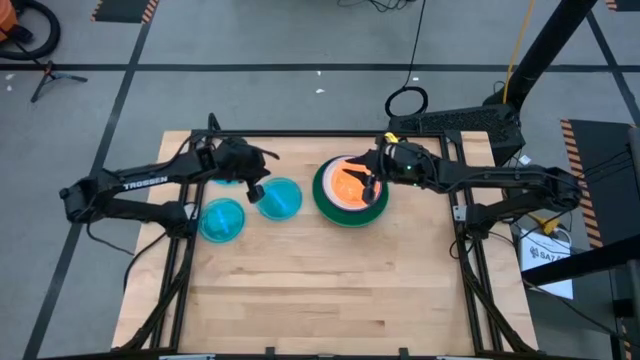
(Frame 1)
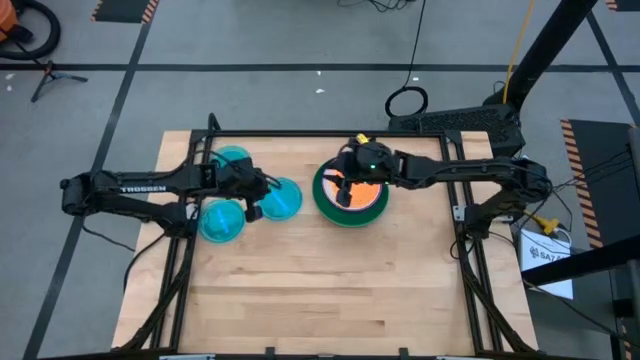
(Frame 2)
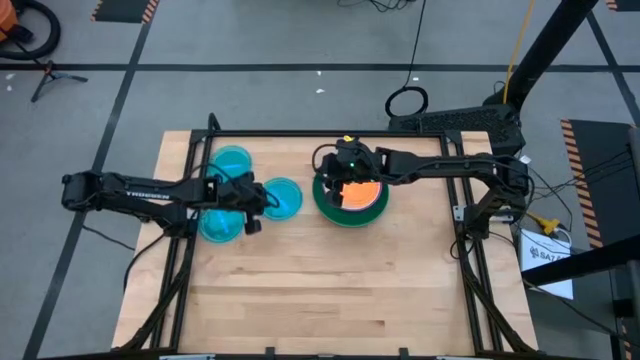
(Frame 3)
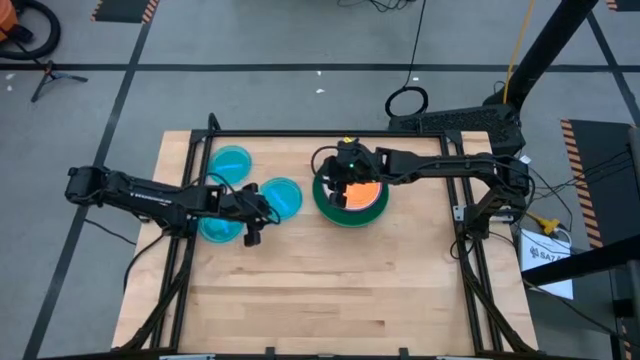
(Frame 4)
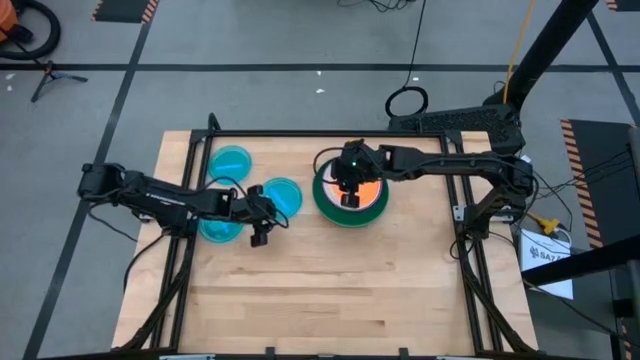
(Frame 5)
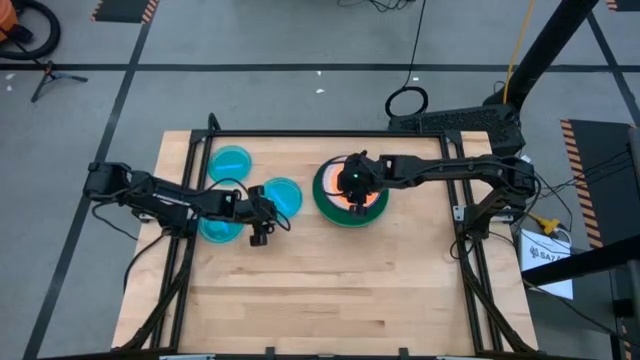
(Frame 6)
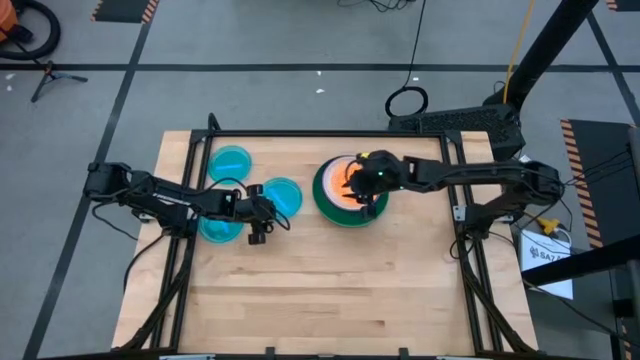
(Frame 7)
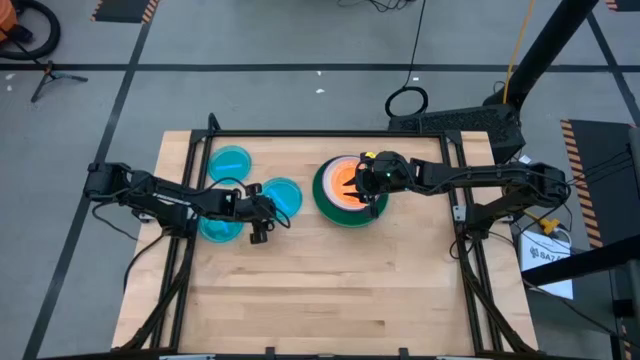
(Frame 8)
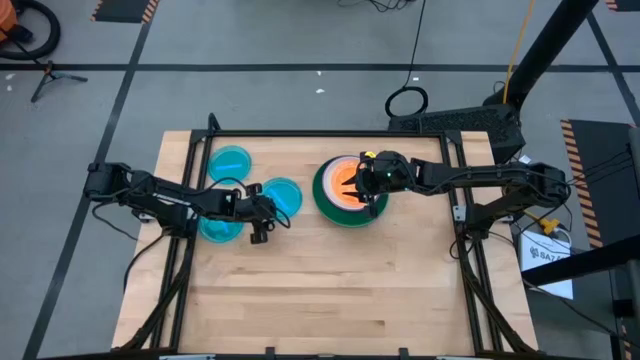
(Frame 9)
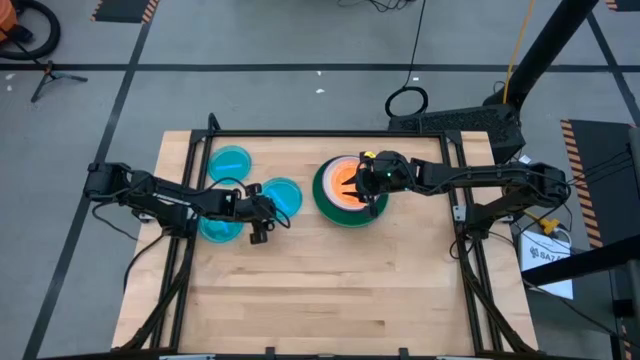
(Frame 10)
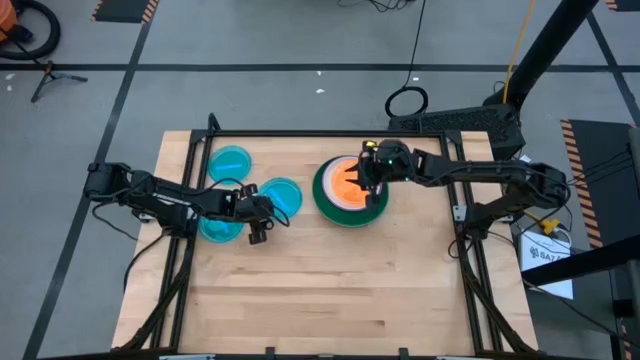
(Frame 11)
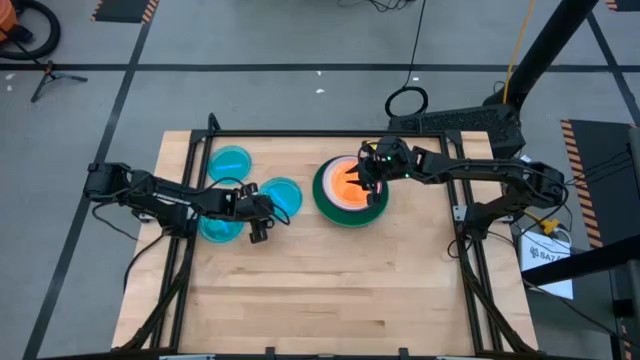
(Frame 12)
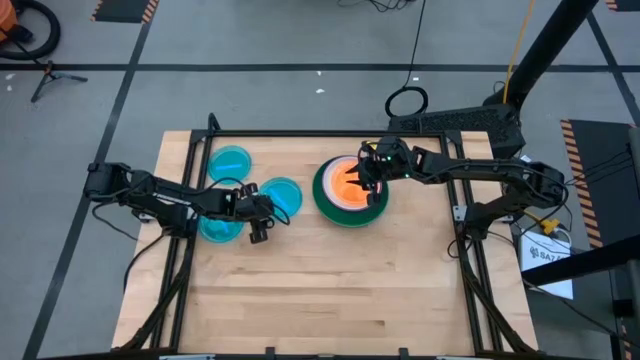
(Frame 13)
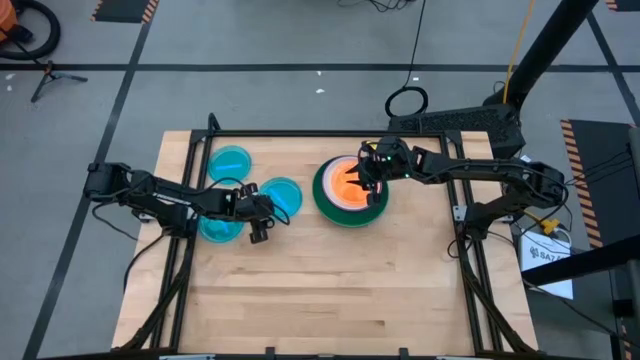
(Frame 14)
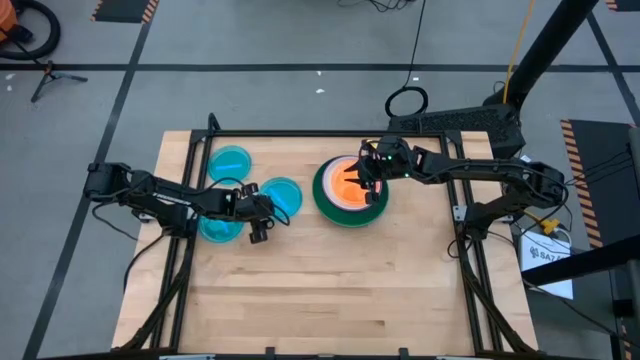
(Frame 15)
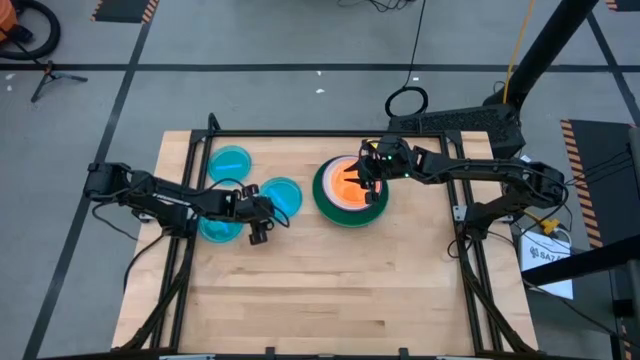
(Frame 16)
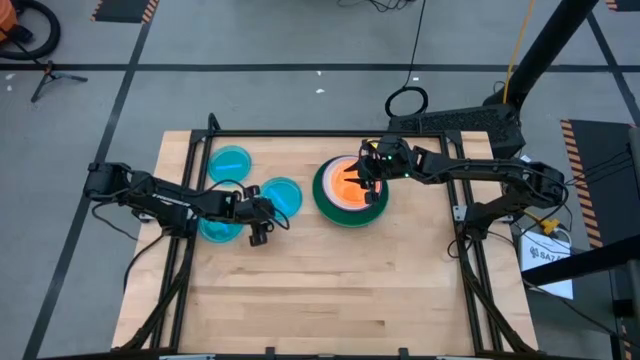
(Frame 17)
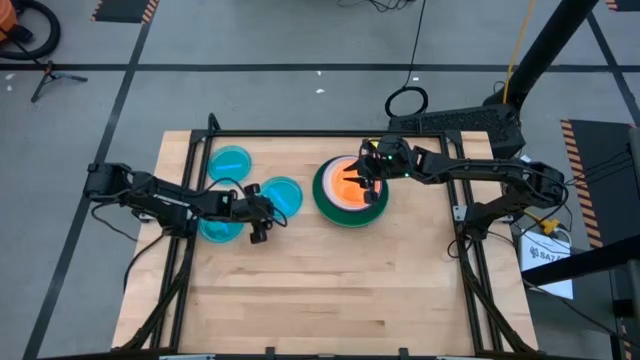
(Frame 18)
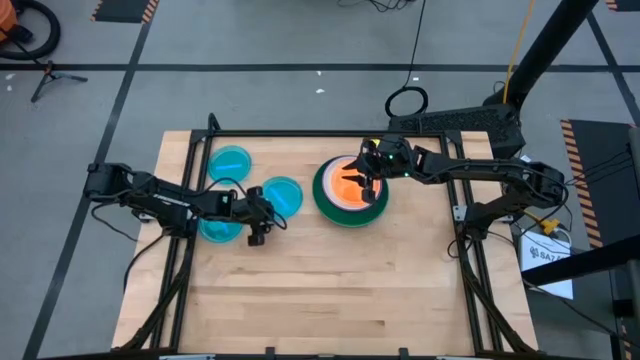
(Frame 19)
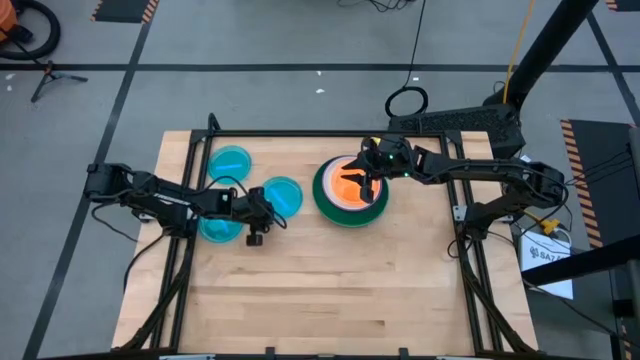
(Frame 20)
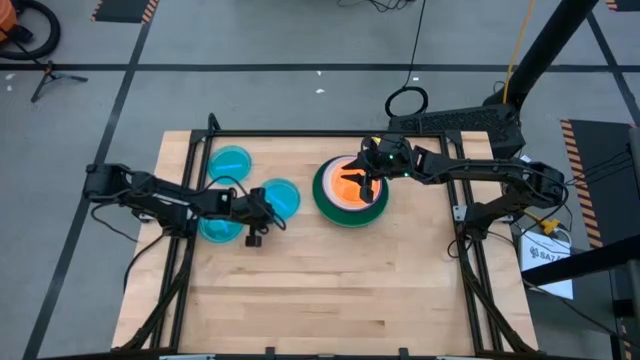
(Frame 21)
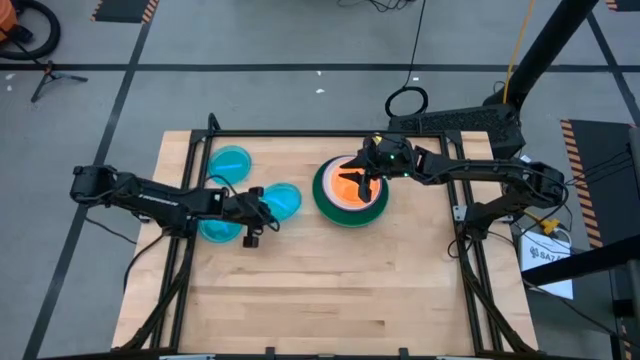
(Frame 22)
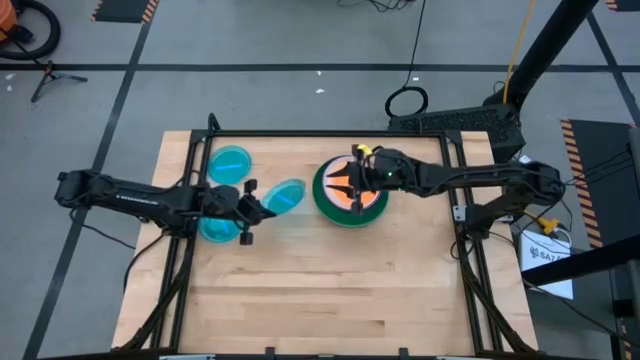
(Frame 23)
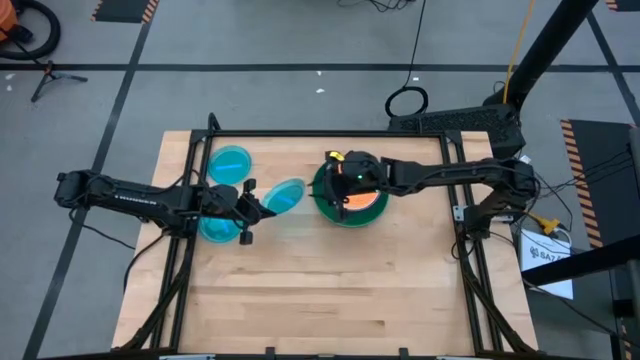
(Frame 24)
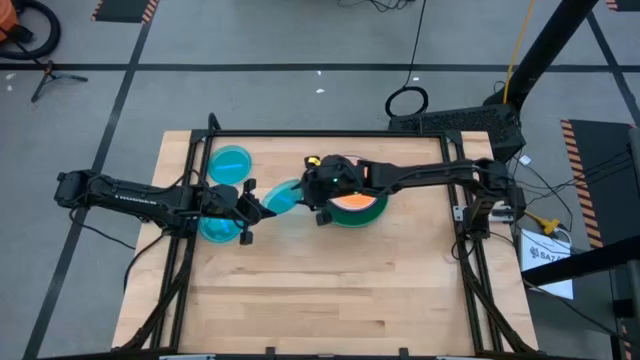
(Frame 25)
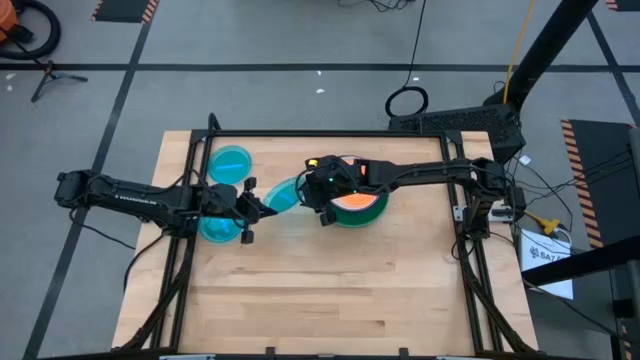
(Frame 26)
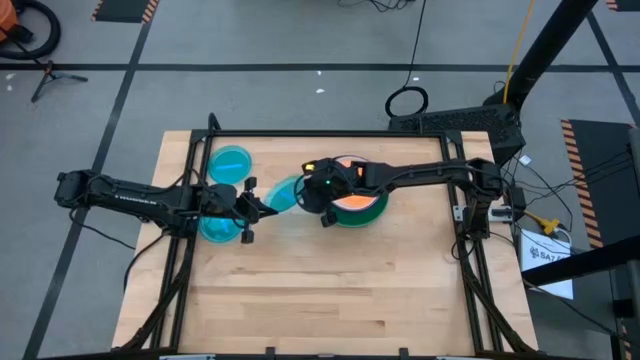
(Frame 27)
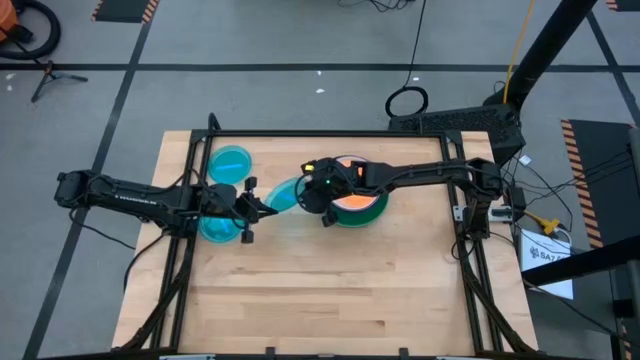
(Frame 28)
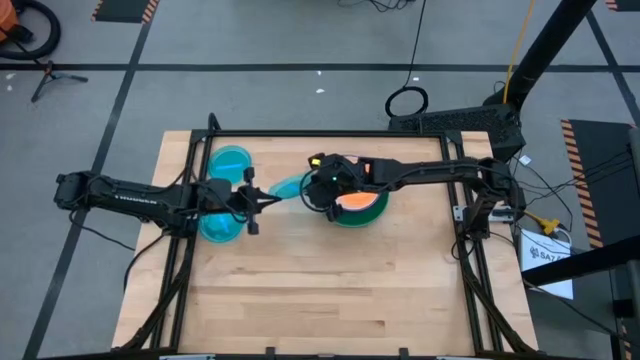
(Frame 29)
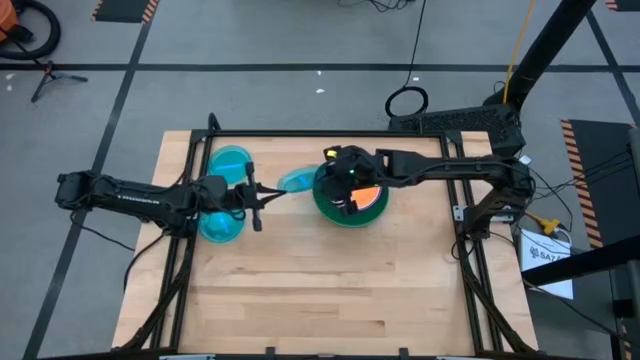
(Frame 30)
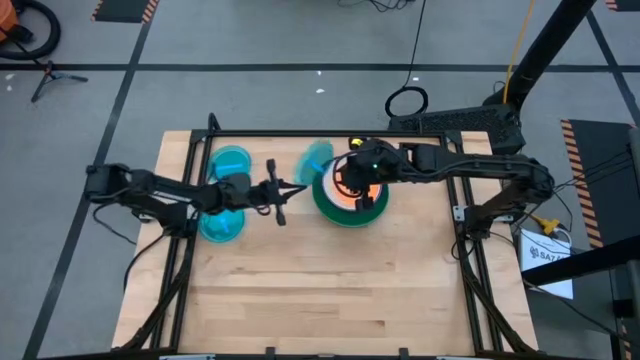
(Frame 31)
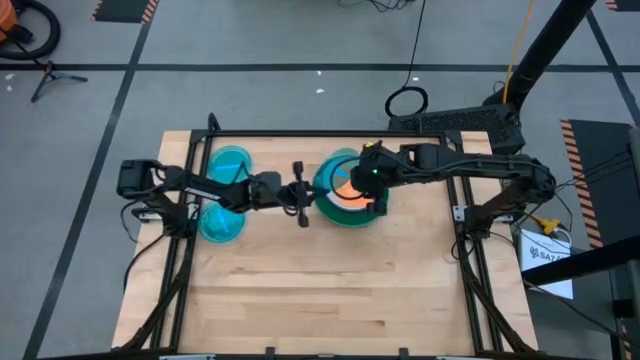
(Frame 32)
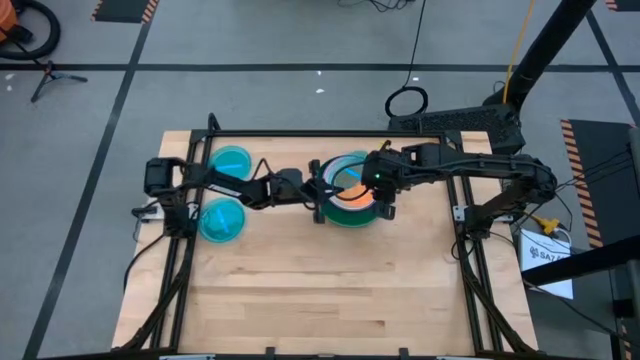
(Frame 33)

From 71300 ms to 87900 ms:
Task: Stack plastic plates
Stack the middle right blue plate on the orange plate

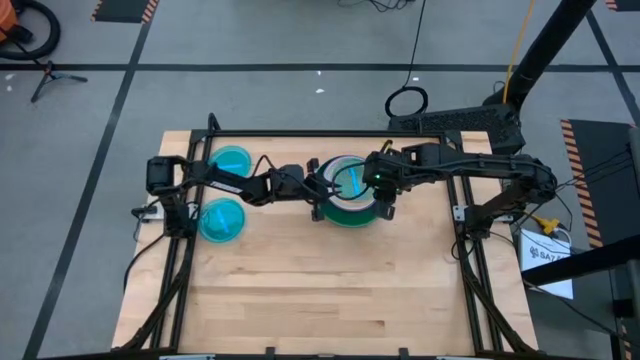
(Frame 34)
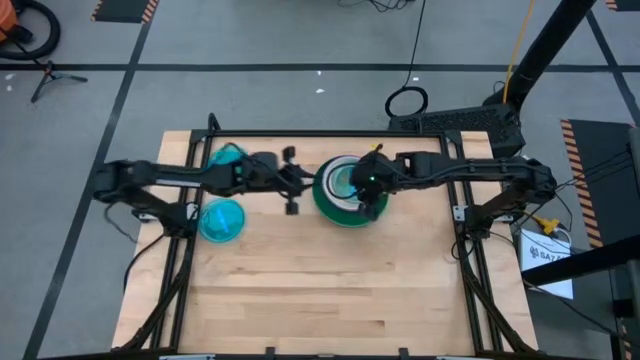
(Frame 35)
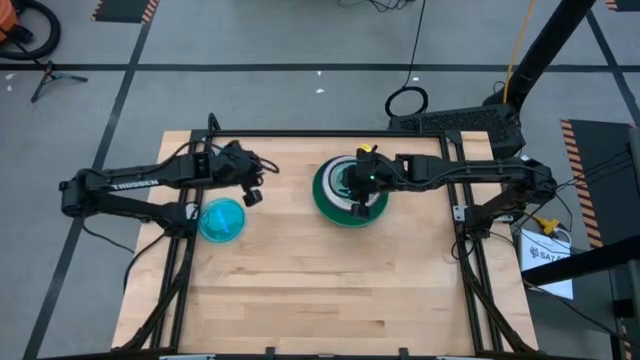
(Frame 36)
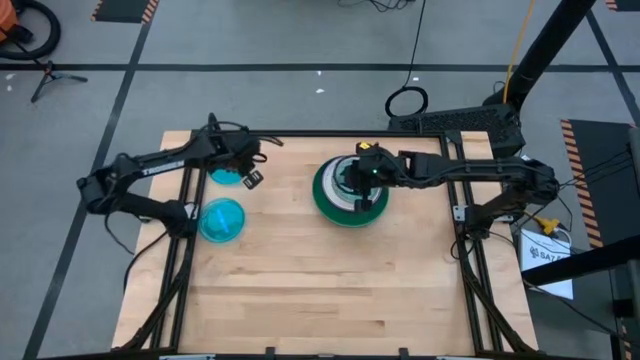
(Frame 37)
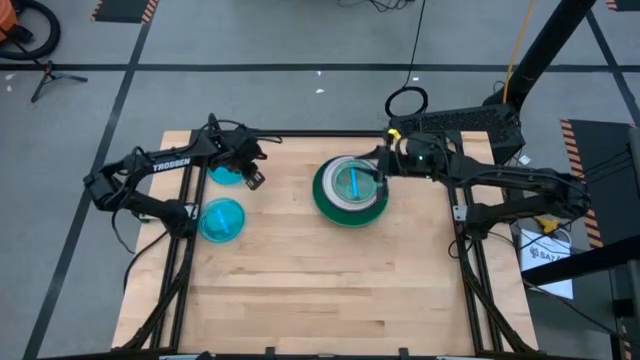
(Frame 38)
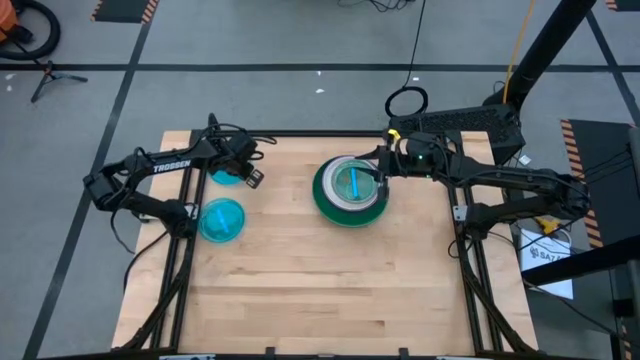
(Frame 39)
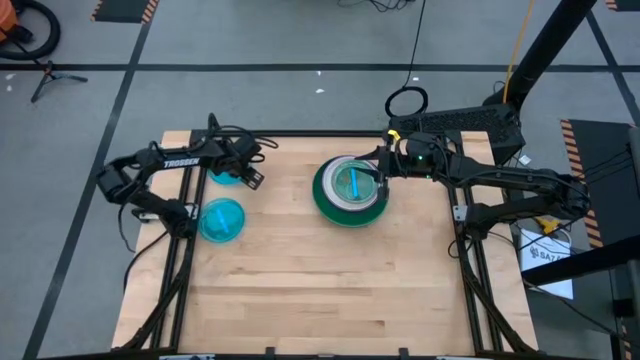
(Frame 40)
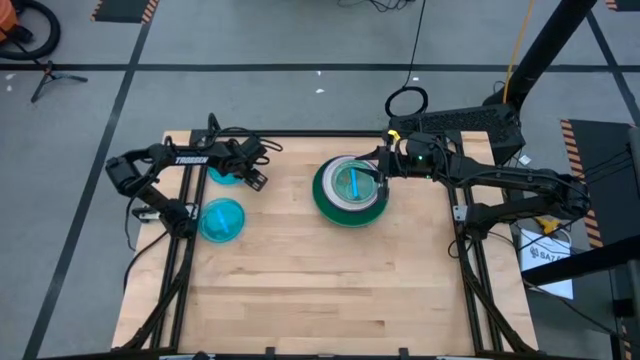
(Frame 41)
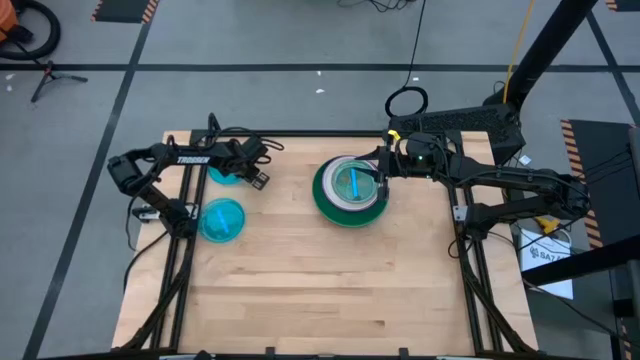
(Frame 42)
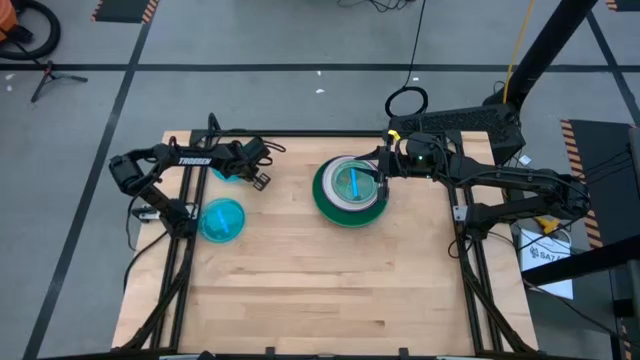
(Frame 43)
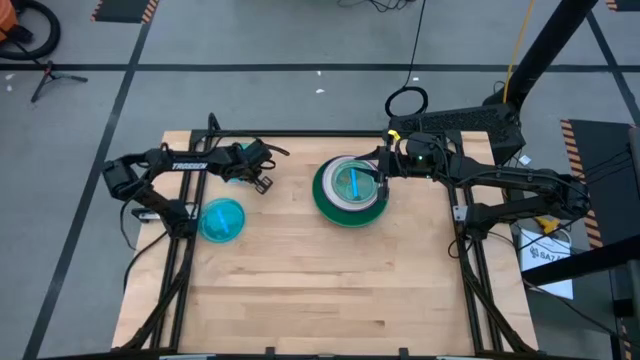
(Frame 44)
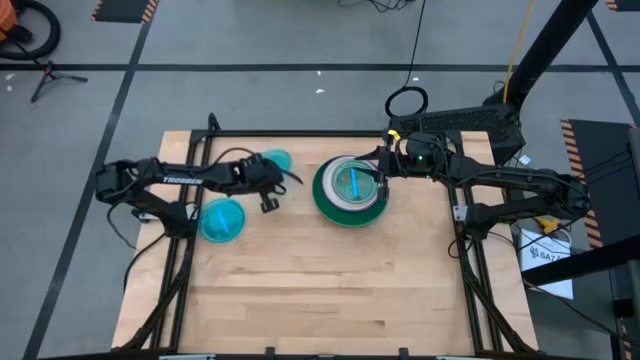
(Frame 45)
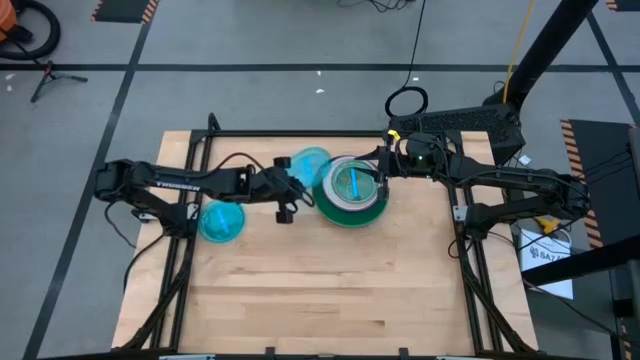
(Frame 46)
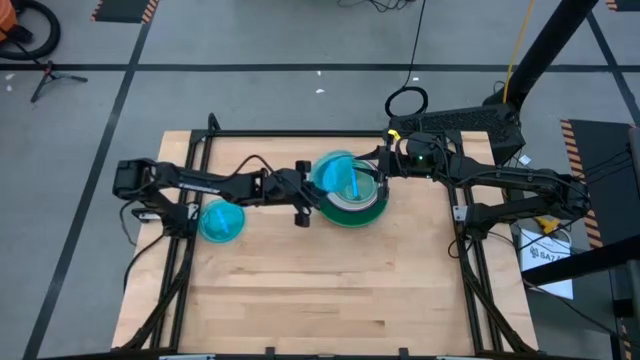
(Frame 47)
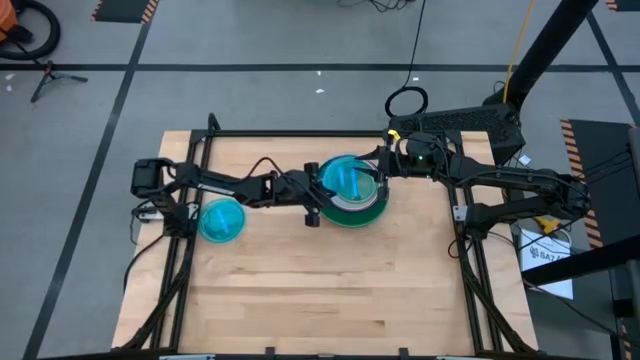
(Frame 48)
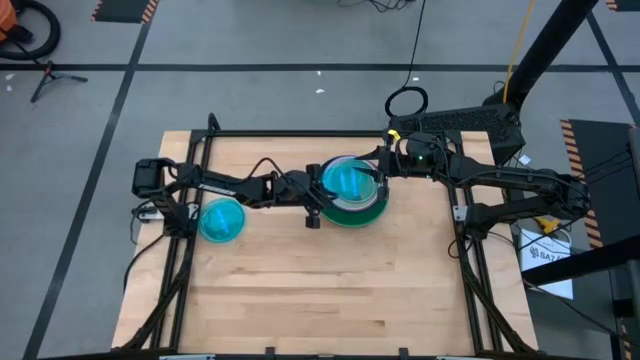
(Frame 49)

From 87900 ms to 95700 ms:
Stack the top blue plate on the right blue plate
